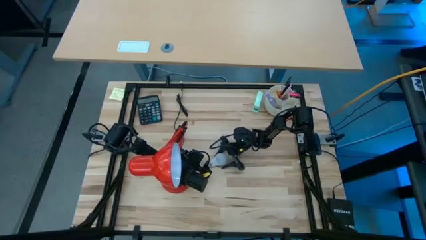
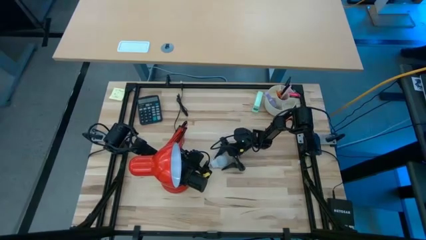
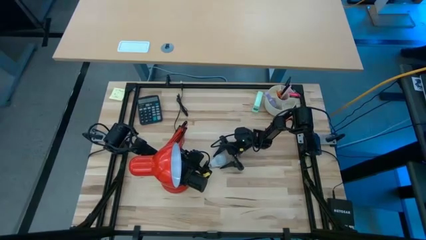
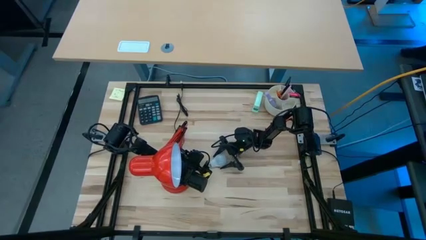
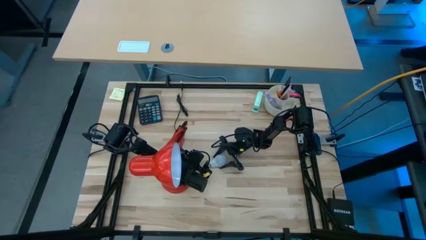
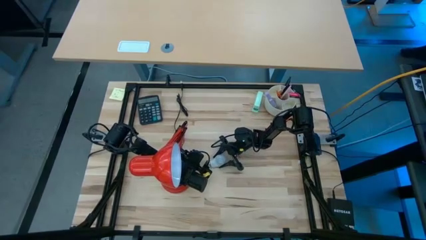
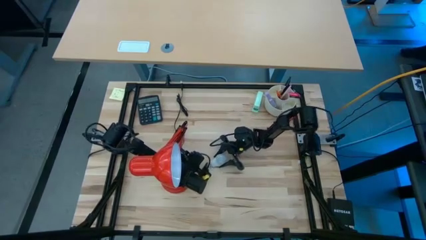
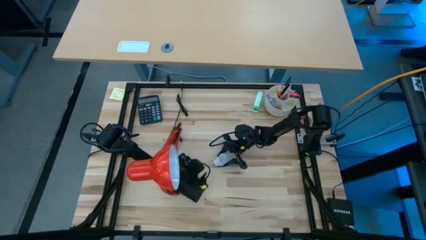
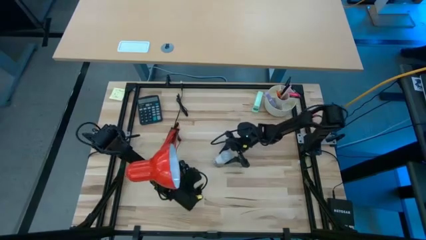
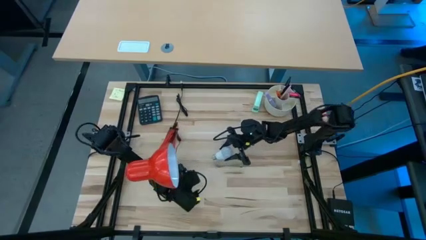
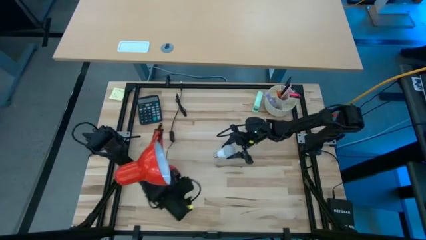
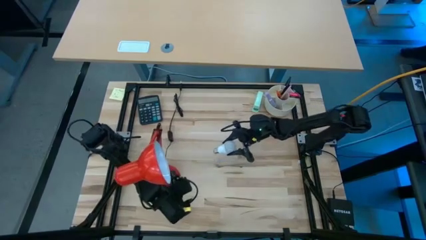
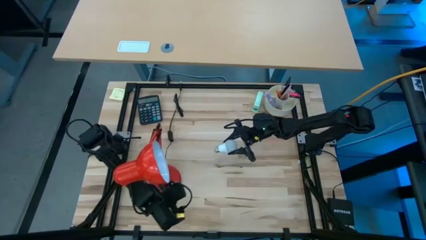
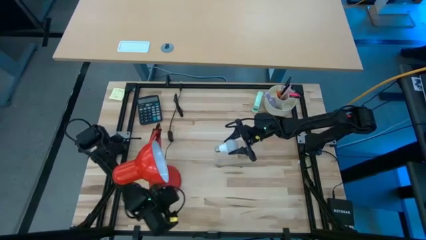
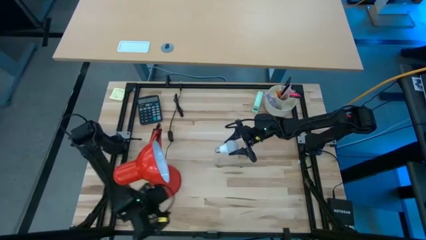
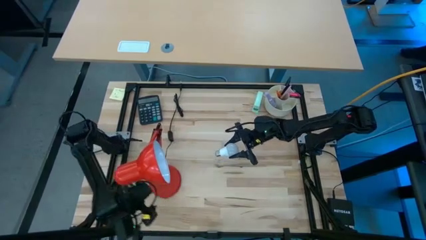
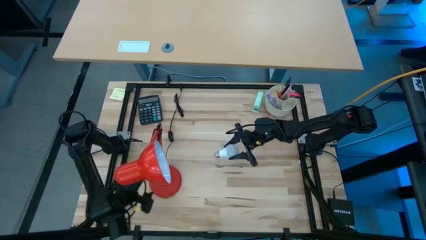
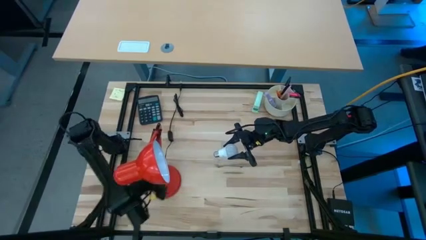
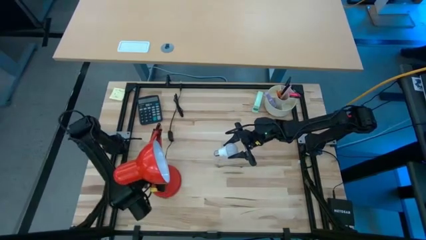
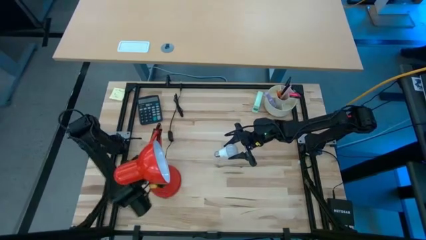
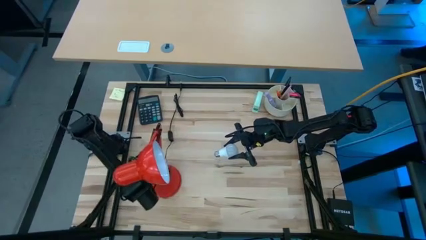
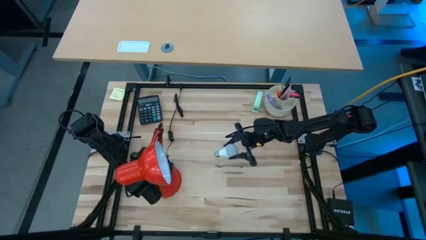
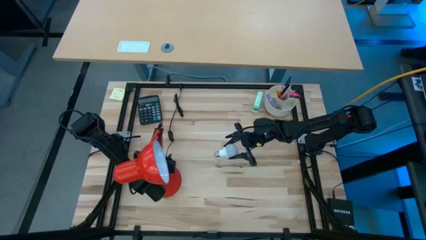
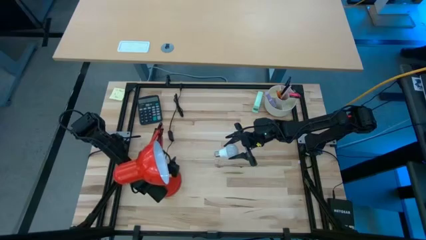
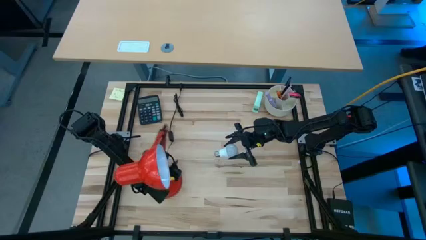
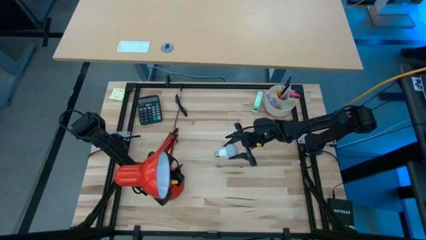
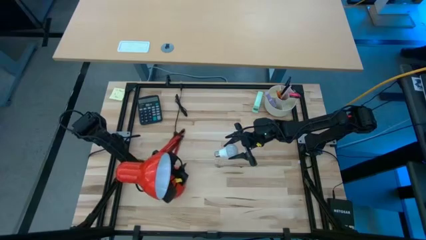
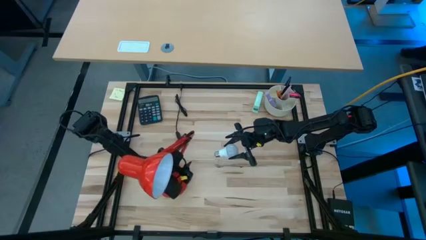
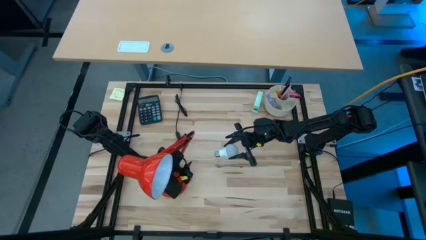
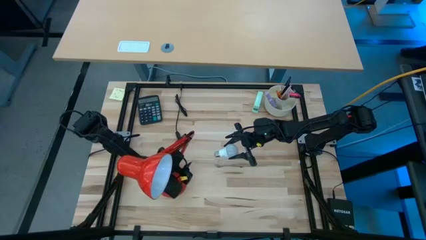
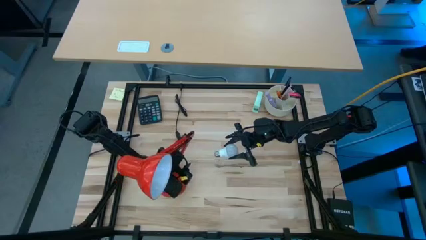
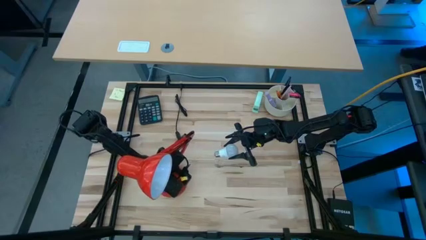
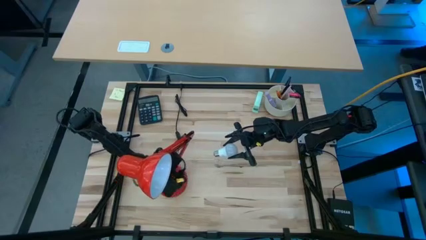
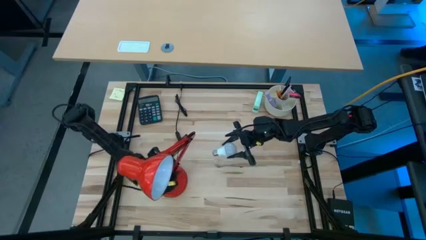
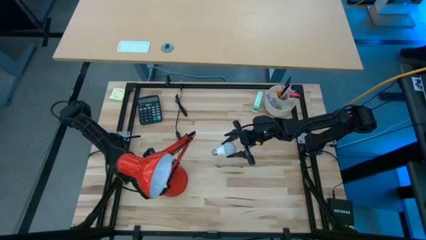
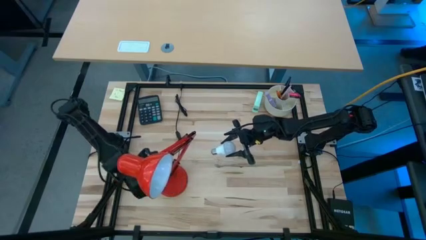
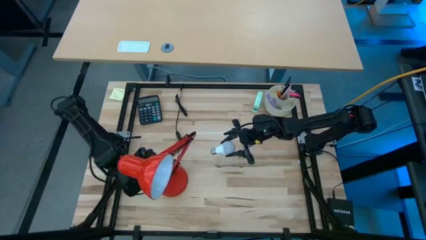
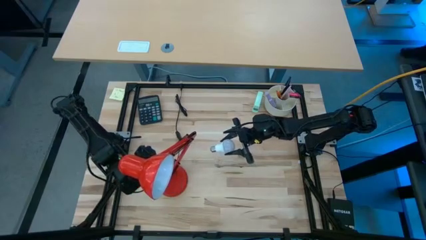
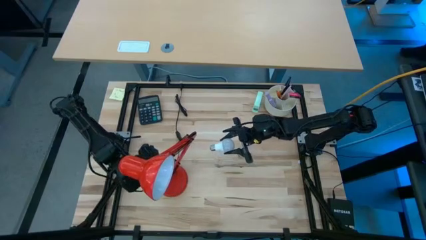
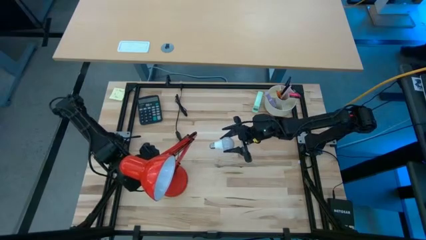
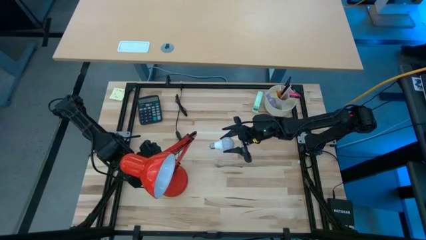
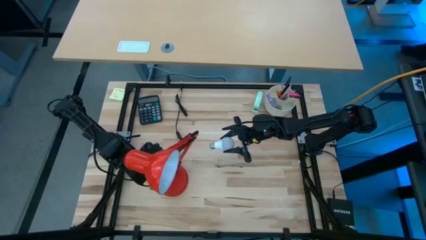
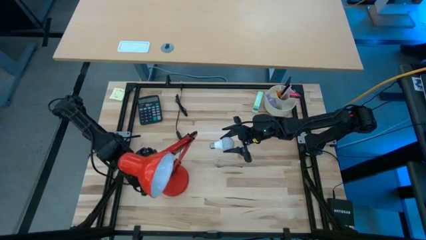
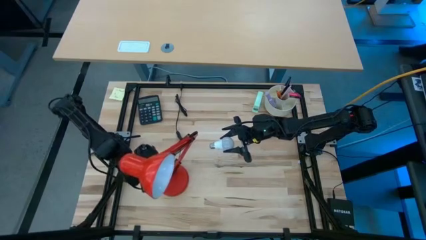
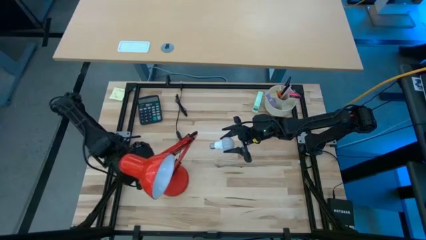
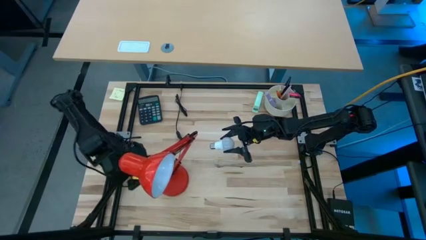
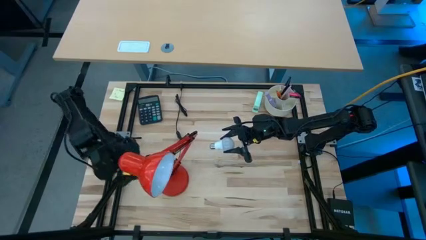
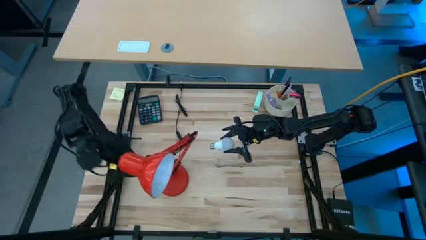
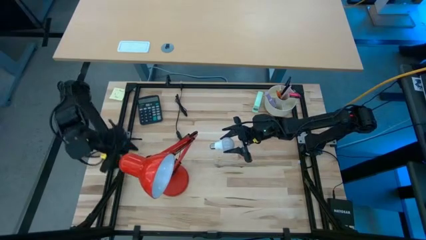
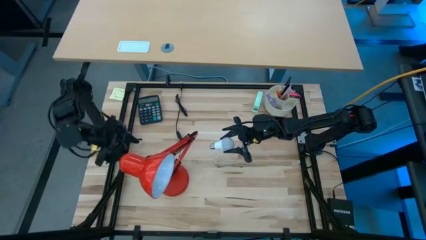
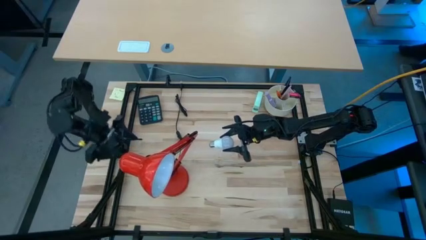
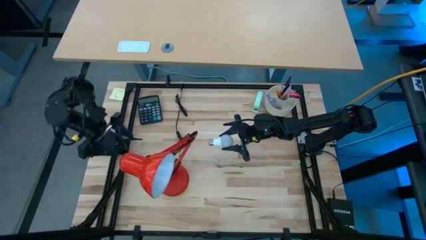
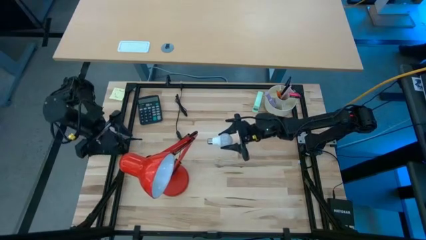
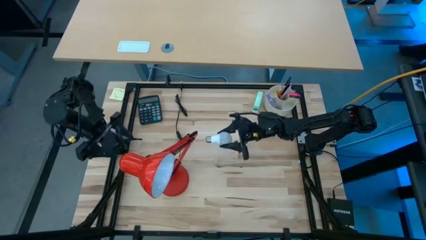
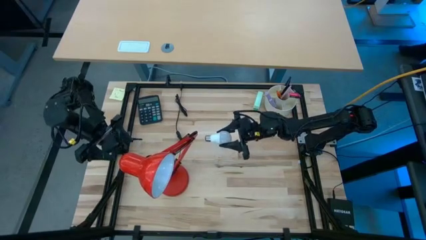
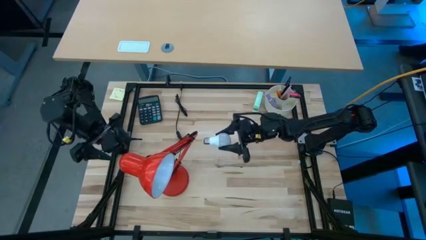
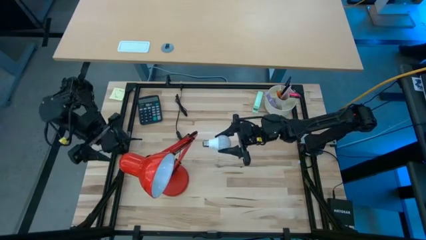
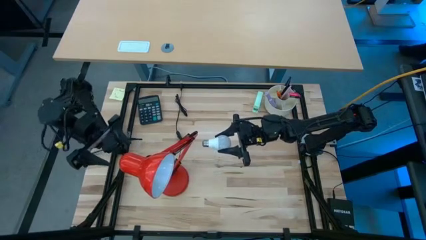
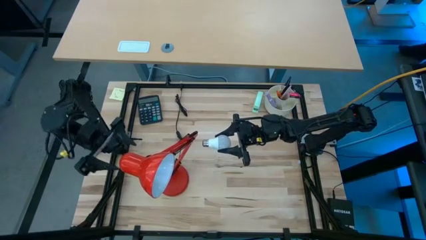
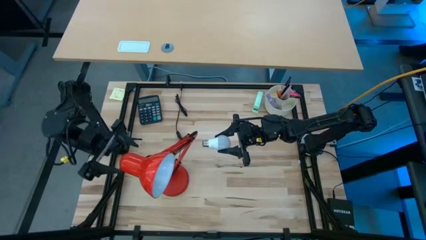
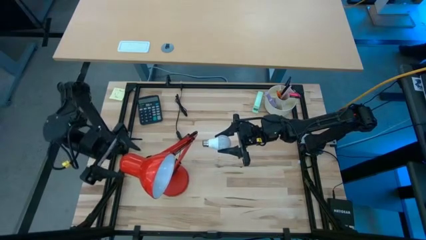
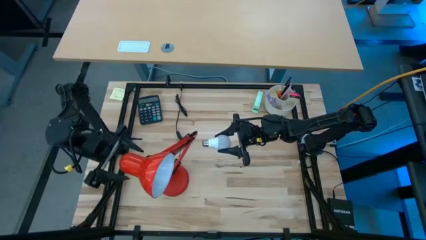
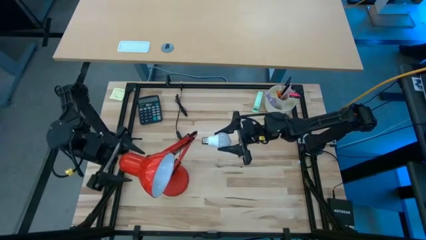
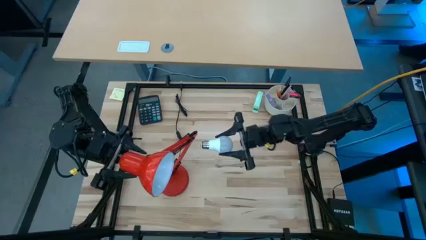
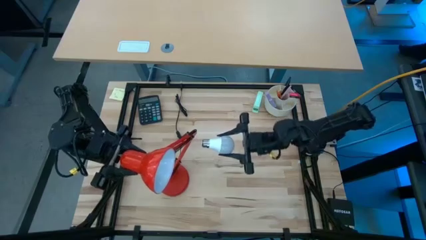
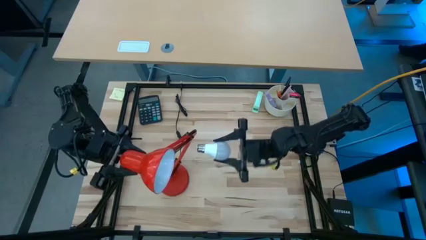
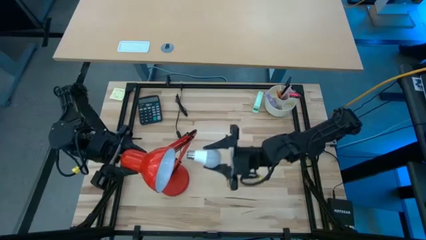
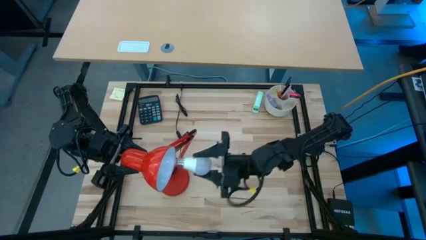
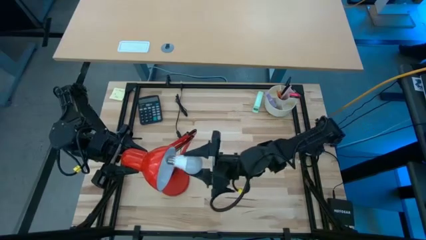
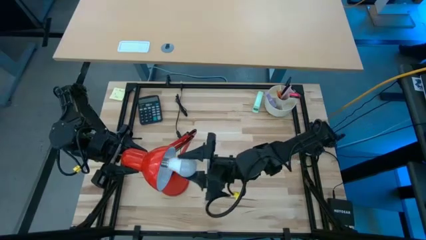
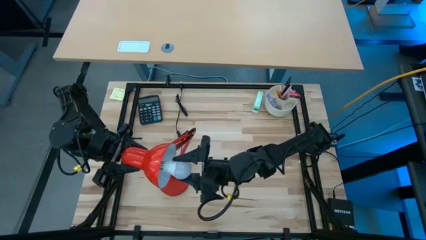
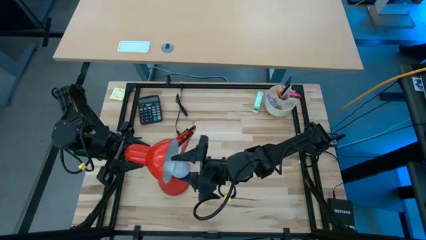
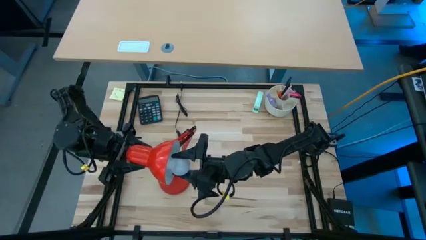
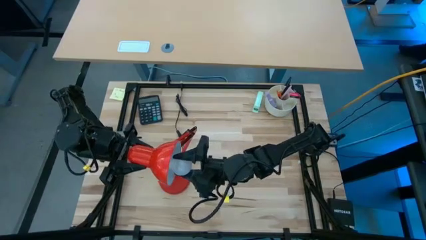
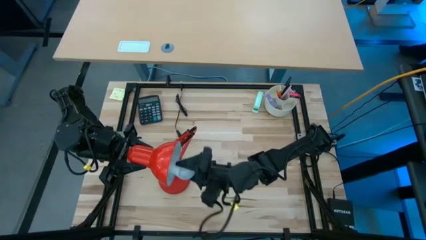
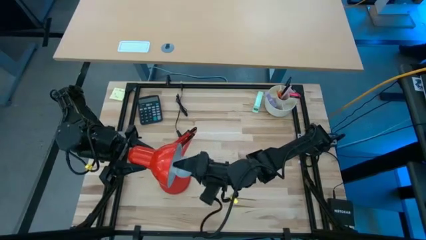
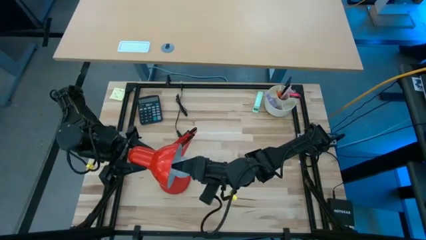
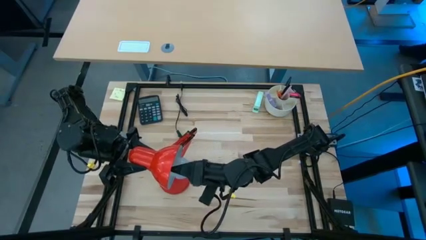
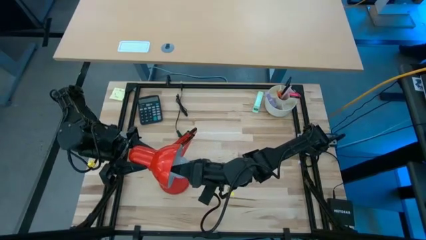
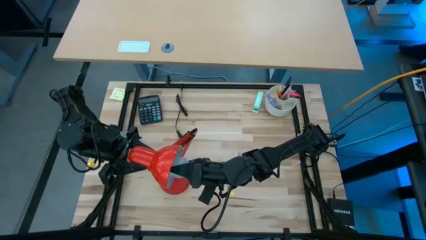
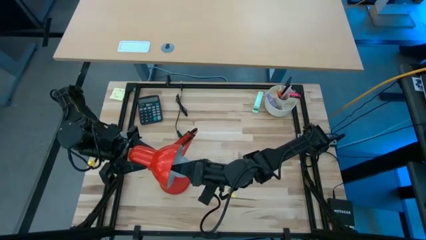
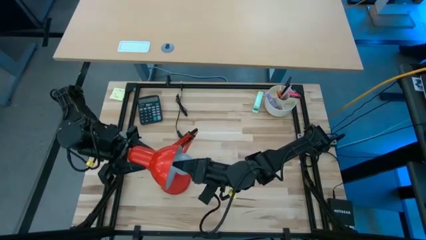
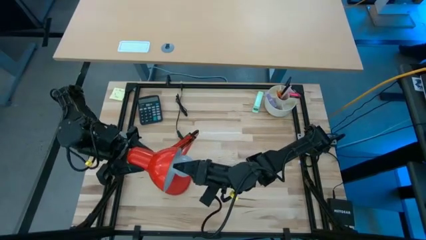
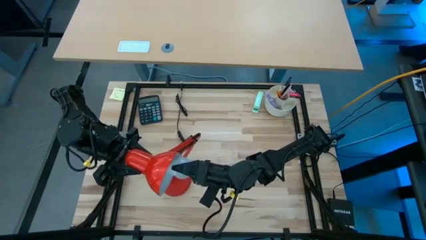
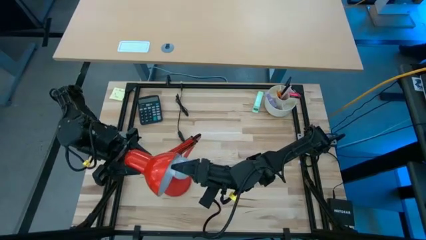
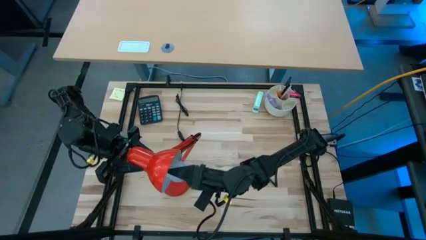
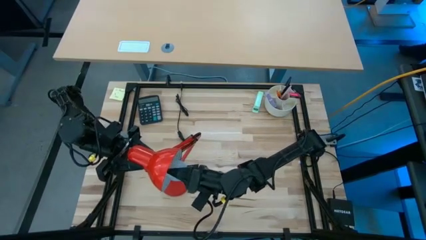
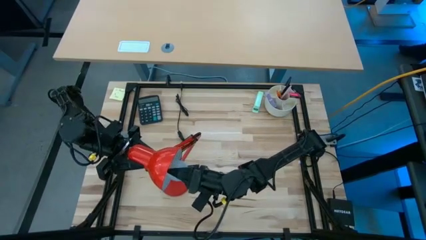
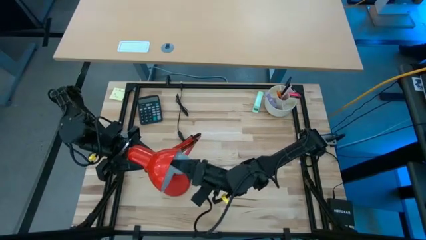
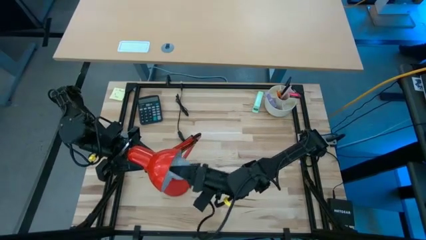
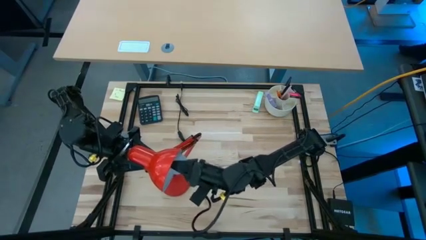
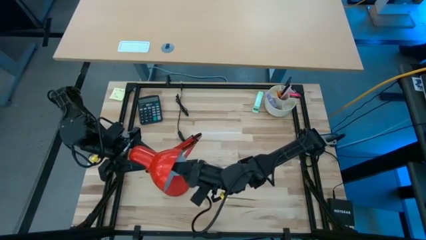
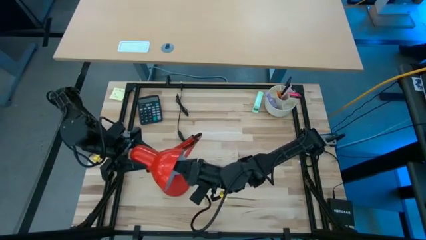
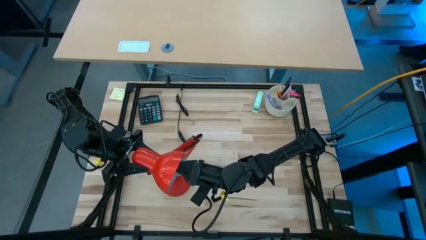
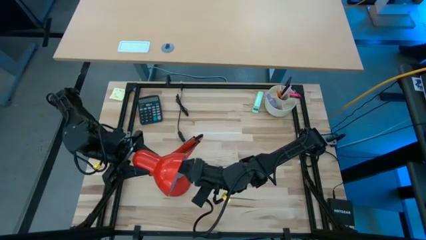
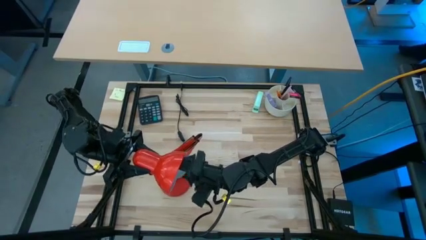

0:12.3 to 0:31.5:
Task: Screw lightbulb
Insert the light bulb into the orange desk lamp
